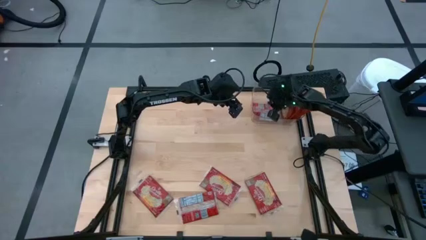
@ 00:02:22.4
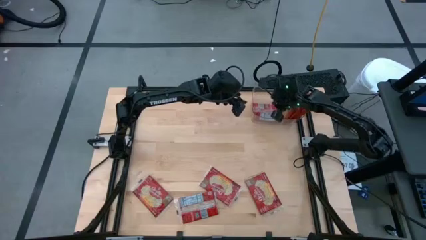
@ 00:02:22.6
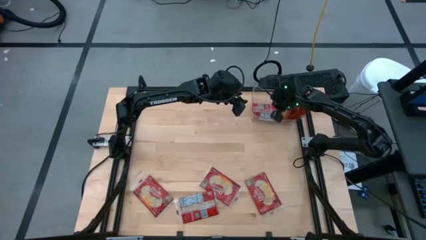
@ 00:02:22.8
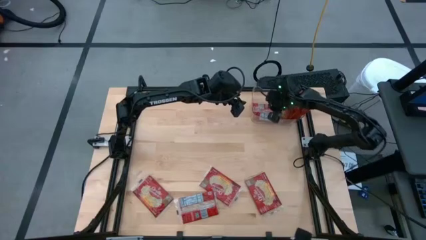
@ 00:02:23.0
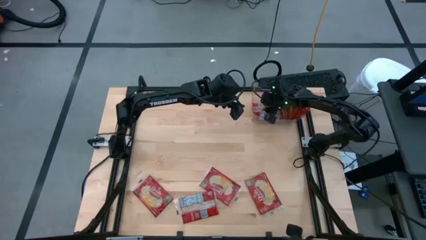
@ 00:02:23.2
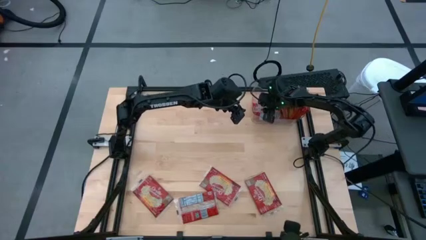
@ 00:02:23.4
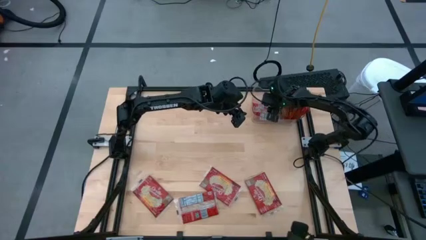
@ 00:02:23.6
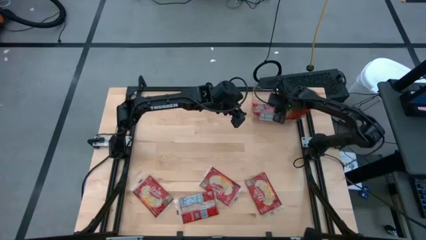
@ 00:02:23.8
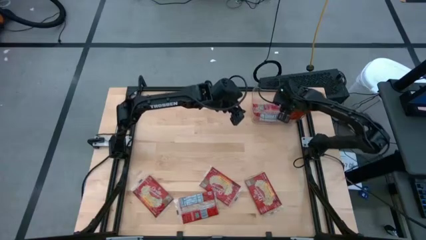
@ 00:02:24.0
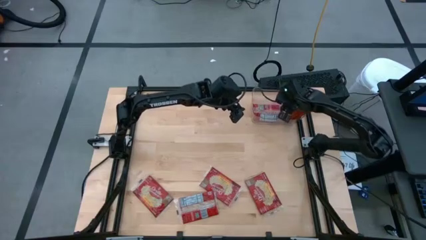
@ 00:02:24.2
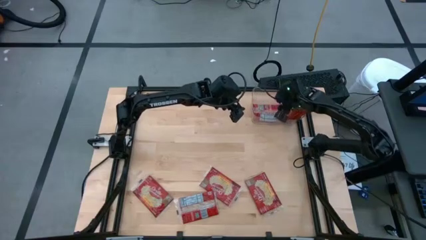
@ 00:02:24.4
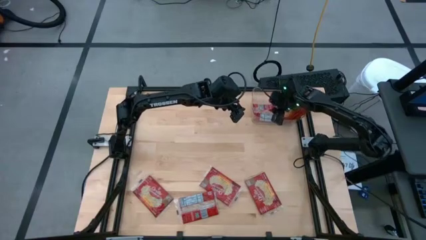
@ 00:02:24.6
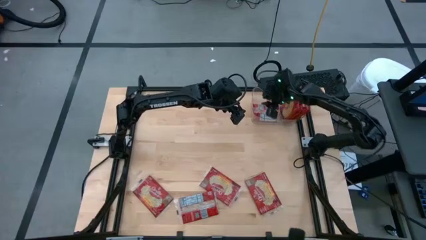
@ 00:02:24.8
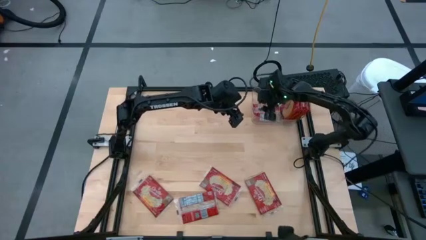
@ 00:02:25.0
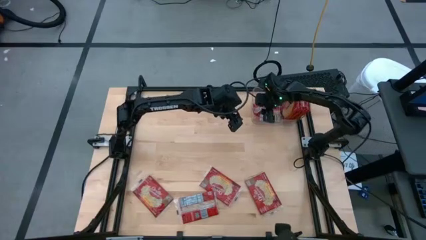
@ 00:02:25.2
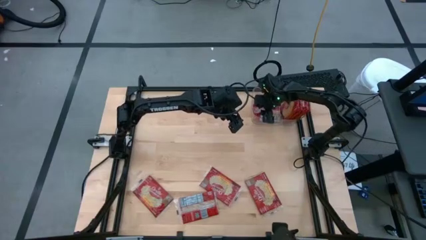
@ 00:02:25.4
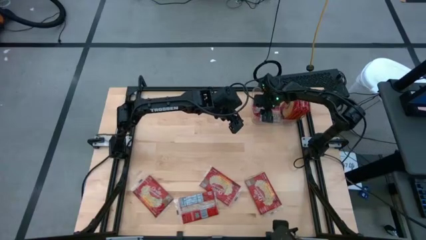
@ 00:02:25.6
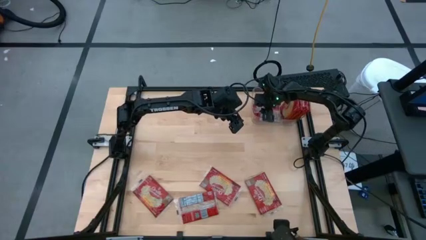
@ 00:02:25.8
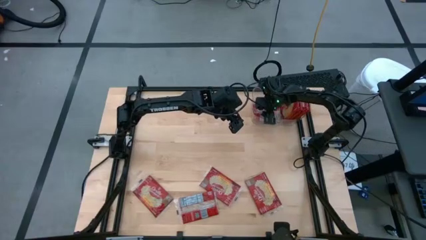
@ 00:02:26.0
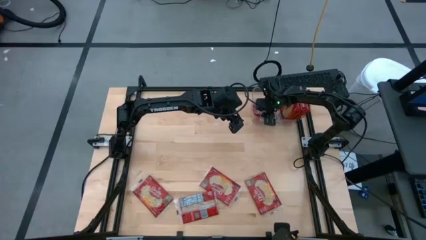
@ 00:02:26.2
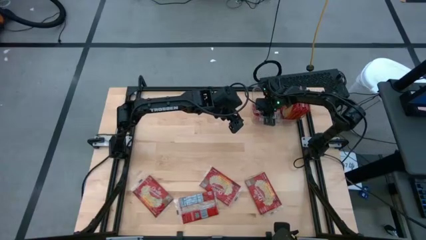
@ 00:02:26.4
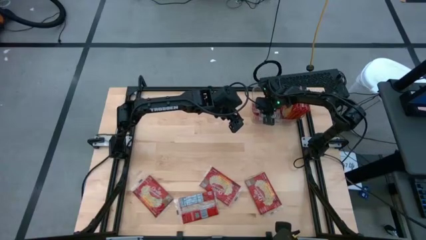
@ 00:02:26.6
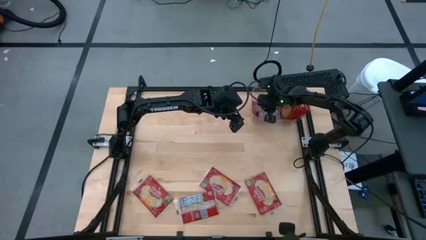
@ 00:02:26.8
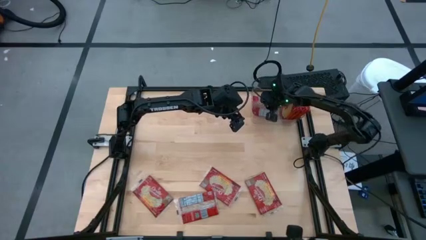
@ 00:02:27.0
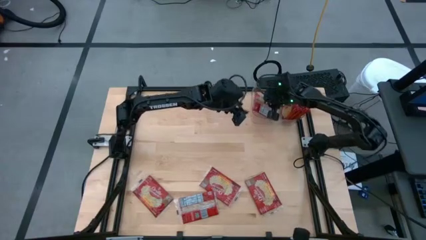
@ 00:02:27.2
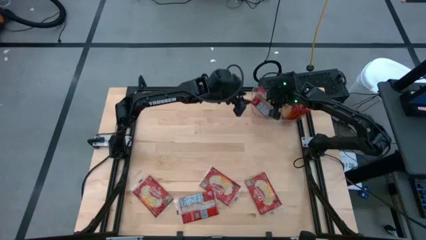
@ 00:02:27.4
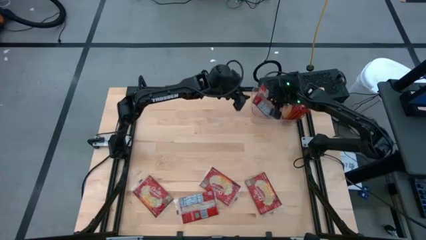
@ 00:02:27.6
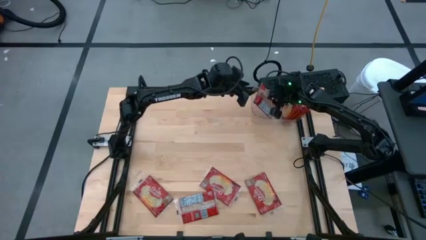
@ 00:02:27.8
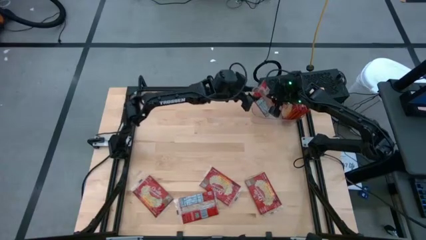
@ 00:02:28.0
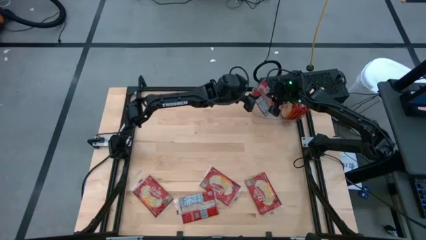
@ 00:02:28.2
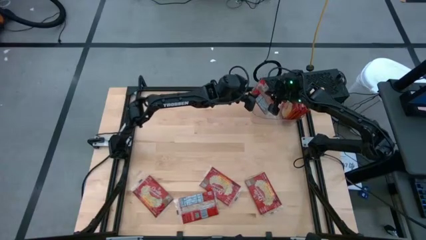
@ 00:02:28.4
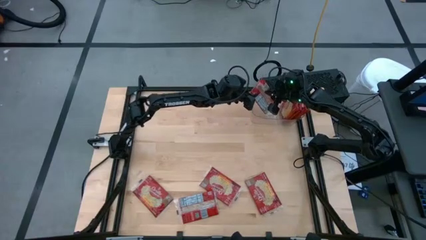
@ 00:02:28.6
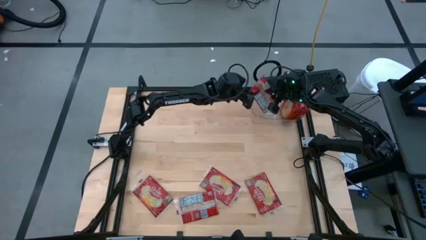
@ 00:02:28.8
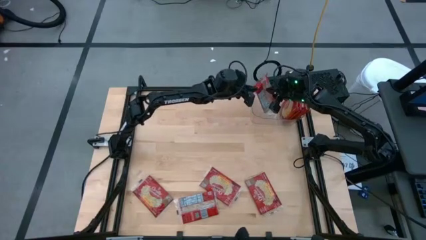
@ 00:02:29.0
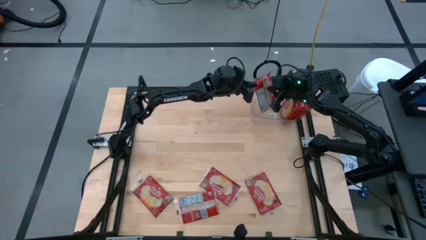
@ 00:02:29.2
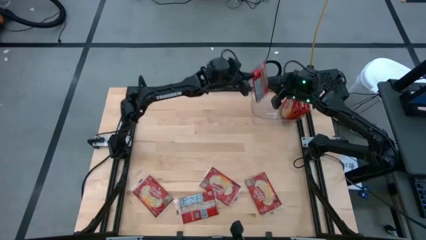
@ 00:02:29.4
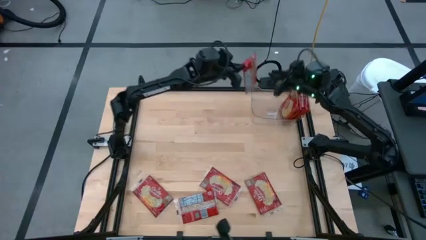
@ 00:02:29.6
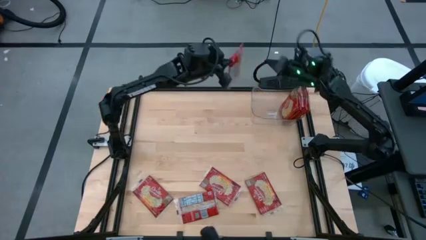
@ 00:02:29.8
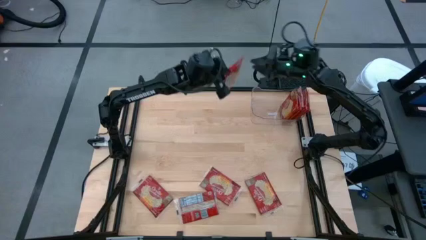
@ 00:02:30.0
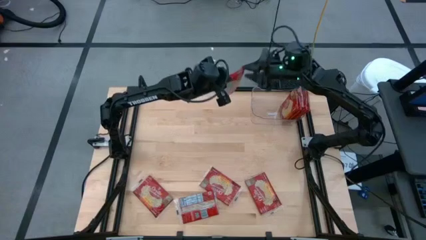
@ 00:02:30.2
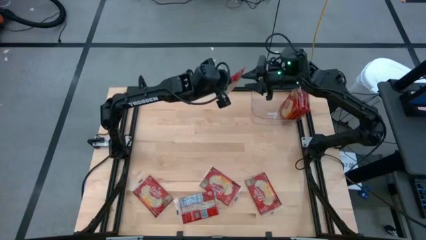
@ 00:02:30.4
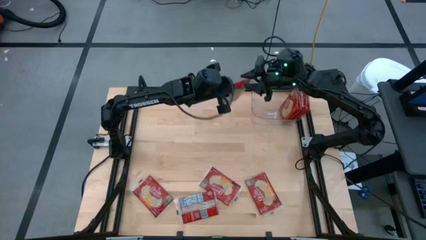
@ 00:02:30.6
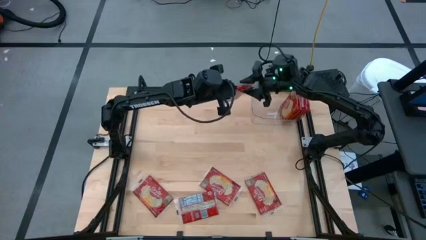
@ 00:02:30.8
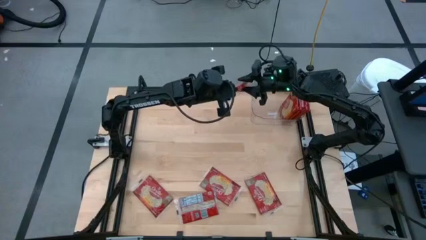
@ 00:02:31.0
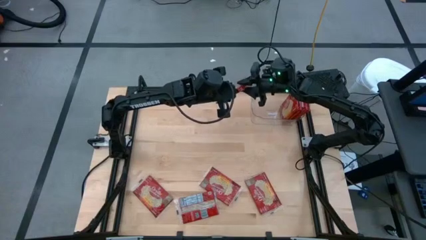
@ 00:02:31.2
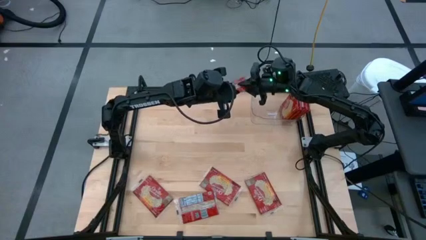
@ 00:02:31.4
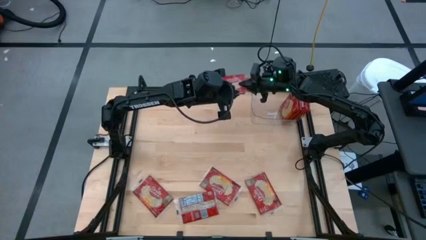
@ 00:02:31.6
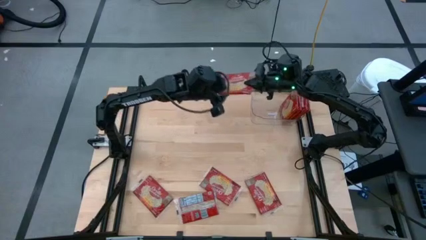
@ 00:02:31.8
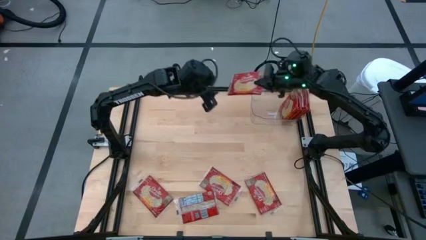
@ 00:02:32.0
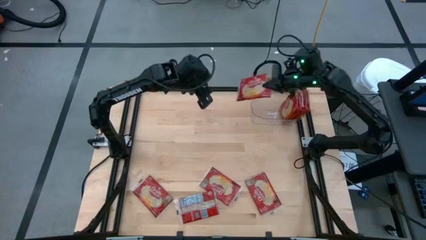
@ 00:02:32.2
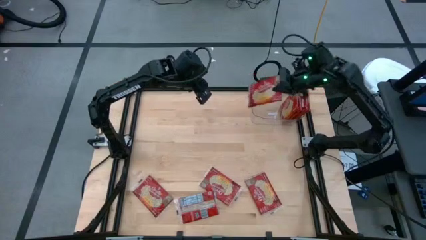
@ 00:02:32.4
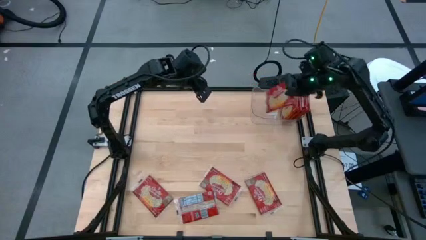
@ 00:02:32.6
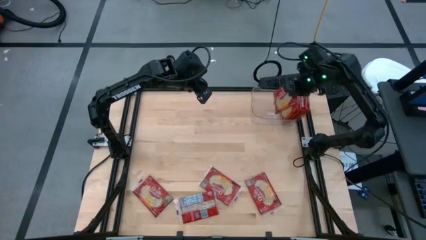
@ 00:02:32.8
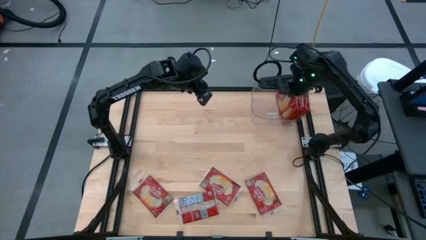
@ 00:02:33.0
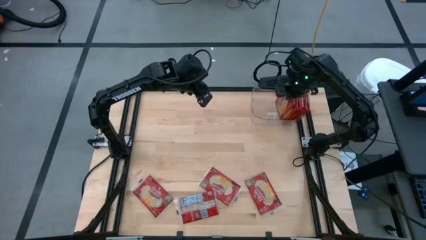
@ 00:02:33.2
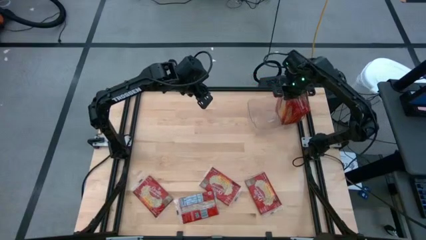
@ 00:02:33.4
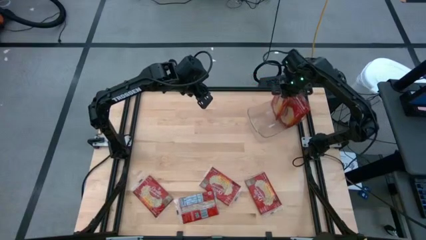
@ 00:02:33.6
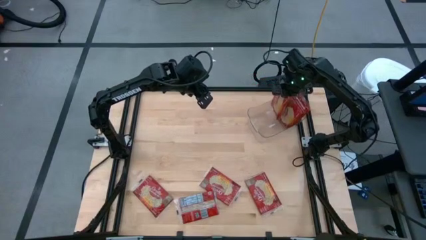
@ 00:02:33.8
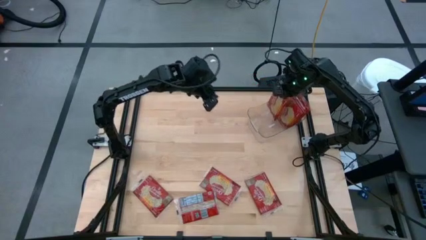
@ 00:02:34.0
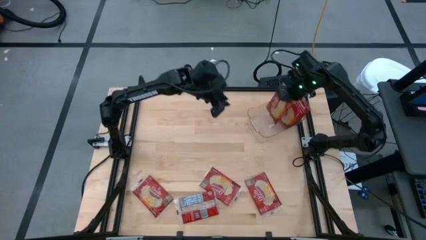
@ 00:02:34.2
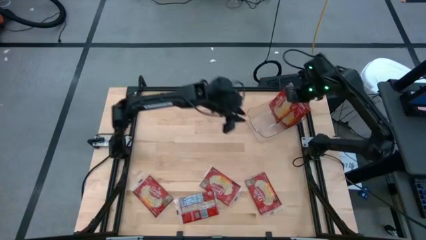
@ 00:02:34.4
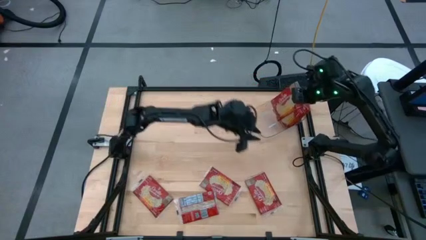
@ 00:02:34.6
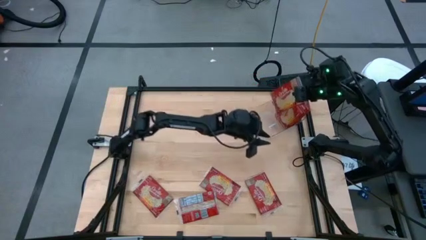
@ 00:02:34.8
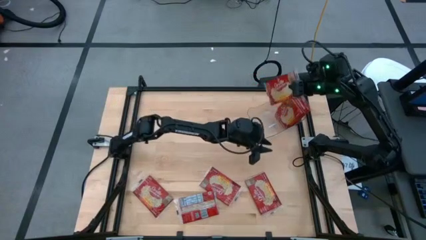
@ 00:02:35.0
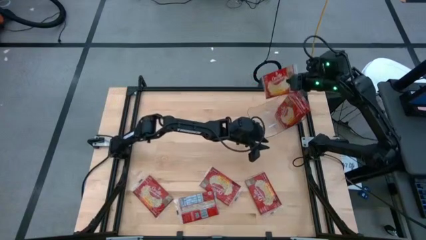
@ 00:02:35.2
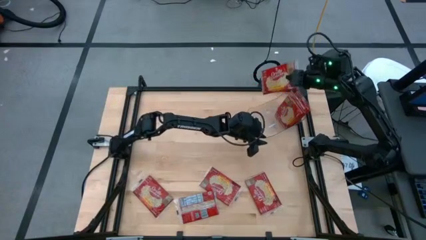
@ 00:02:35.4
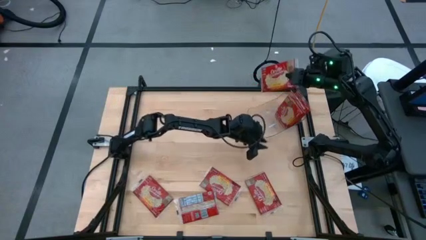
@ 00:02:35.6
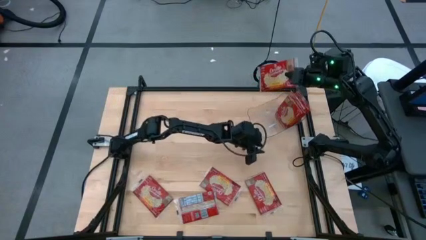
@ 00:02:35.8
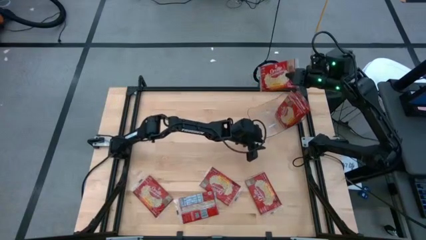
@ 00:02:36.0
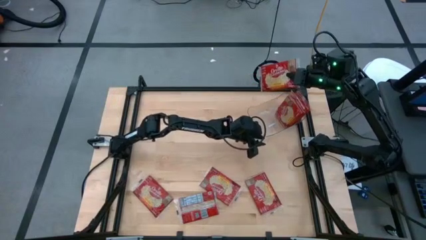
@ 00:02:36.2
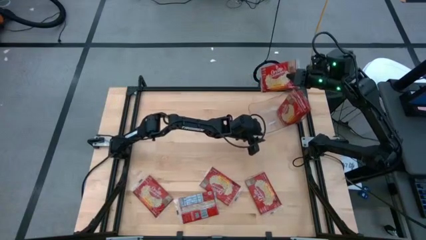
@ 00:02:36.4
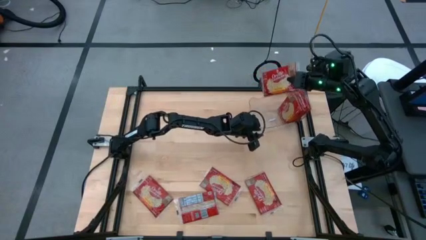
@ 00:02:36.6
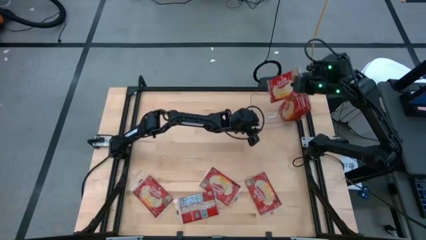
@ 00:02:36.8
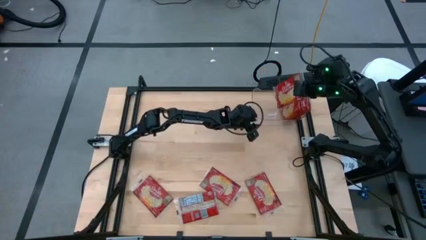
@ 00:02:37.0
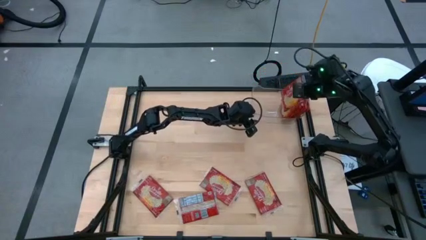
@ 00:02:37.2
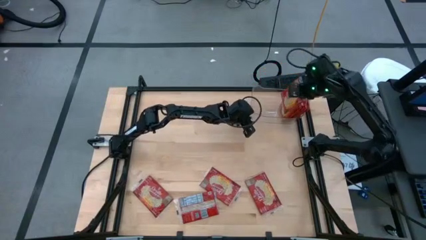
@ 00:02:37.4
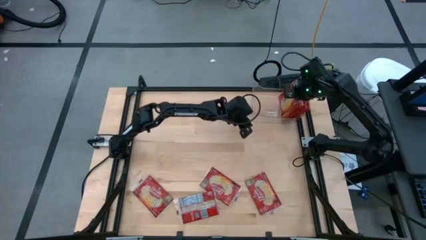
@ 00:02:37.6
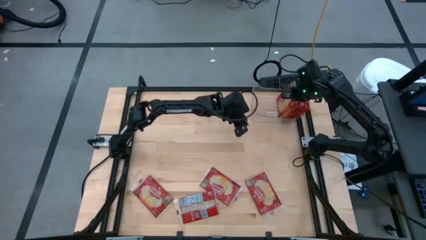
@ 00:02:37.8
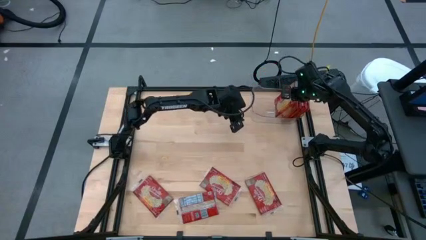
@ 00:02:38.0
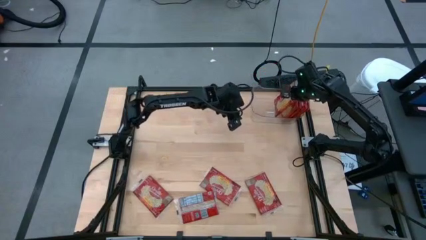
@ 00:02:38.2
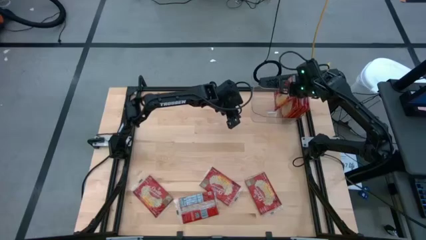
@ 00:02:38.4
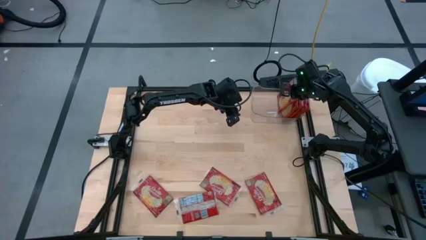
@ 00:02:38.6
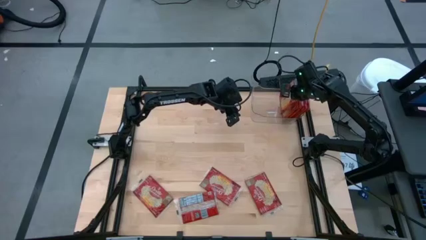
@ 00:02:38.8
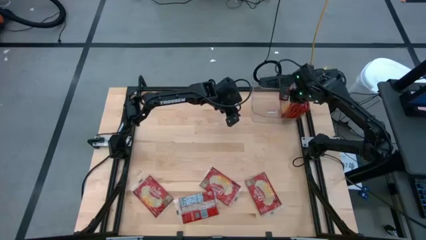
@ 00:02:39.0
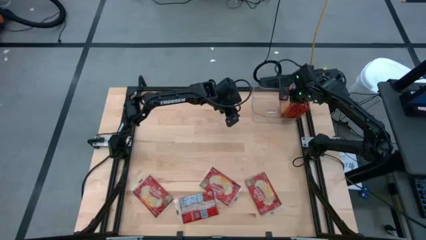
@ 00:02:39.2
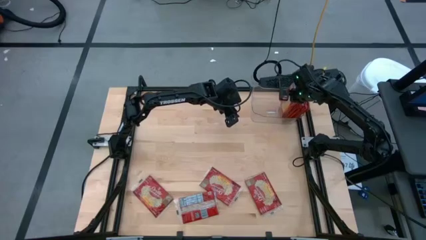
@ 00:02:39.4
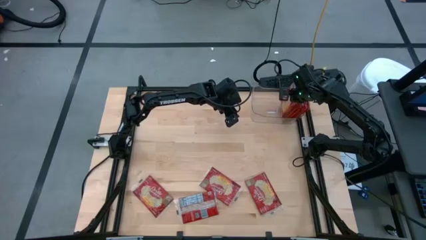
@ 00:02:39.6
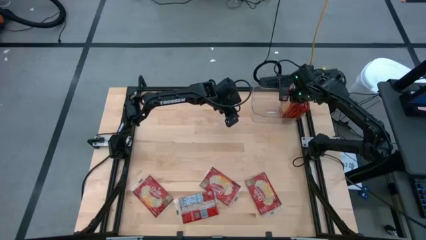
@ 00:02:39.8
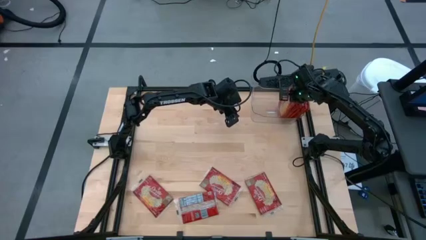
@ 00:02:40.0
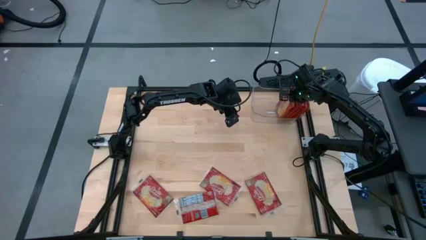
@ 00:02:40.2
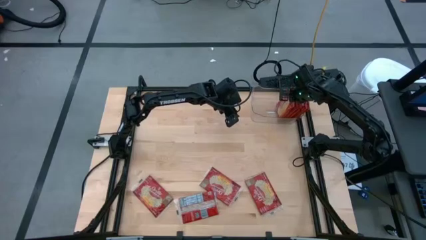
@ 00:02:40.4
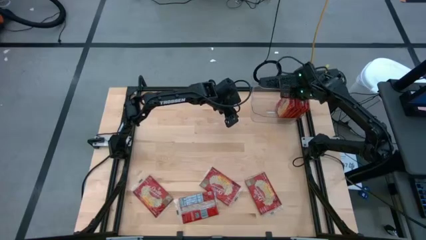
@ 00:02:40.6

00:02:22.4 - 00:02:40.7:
Task: Sort popcorn bags into baskets
Adjust the red popcorn bag in the transparent bin
